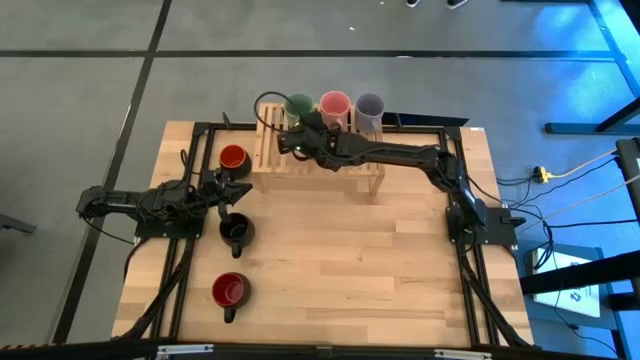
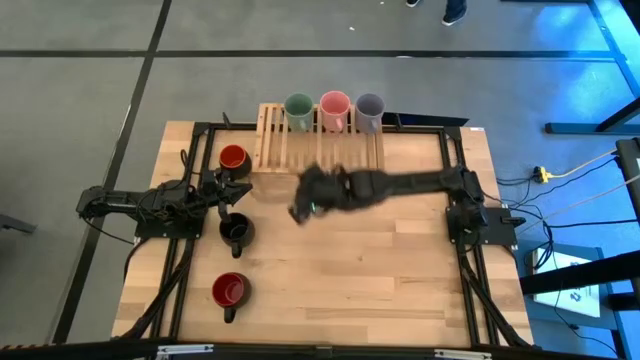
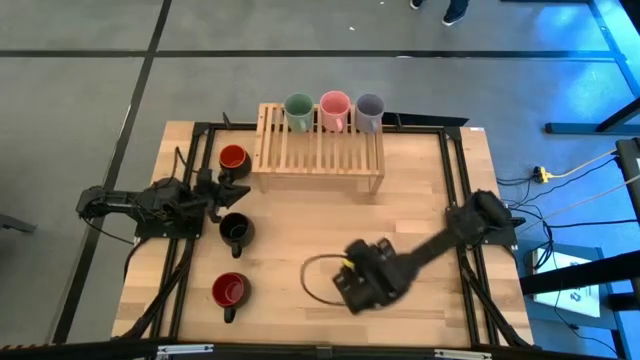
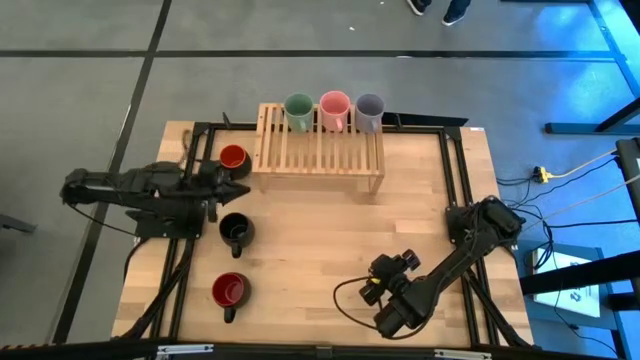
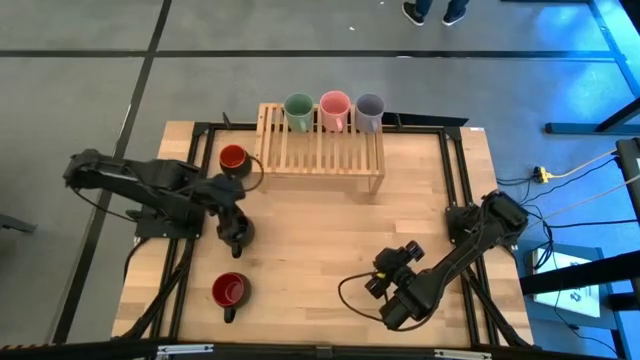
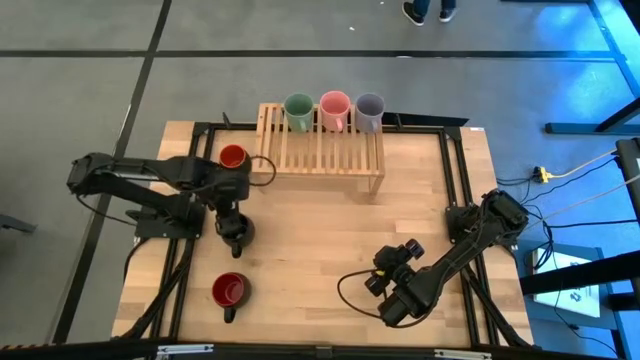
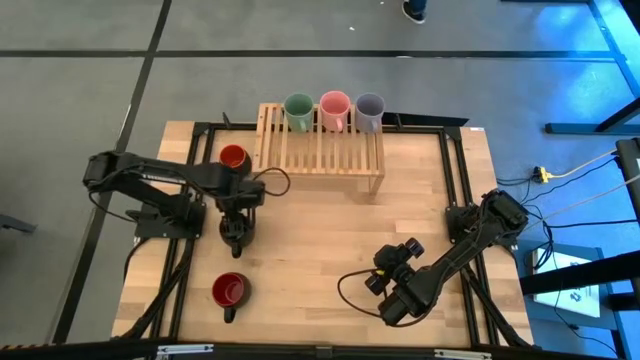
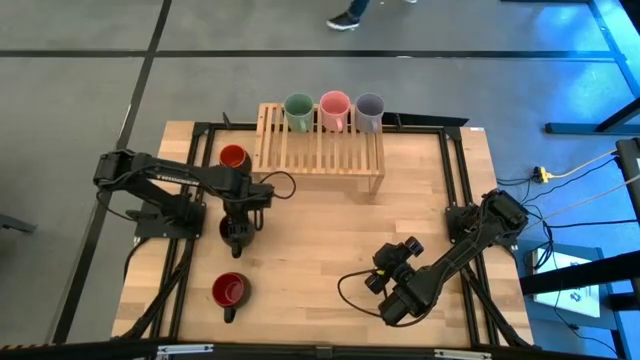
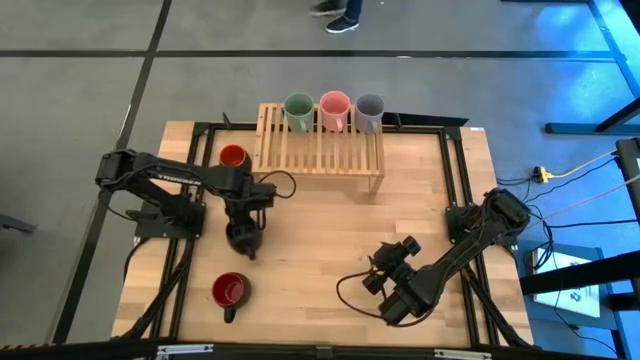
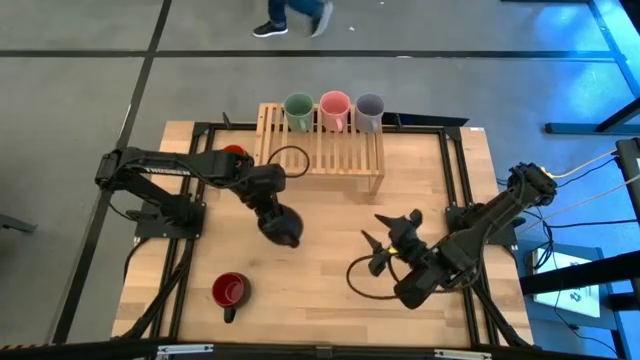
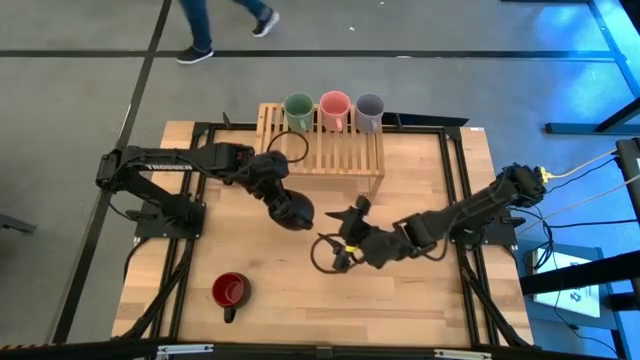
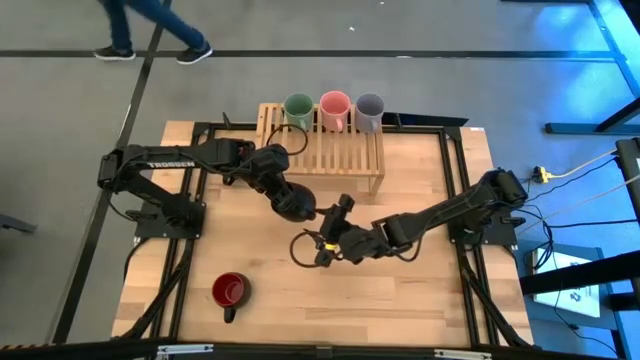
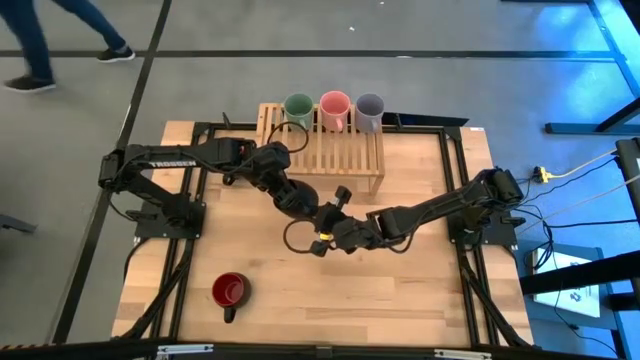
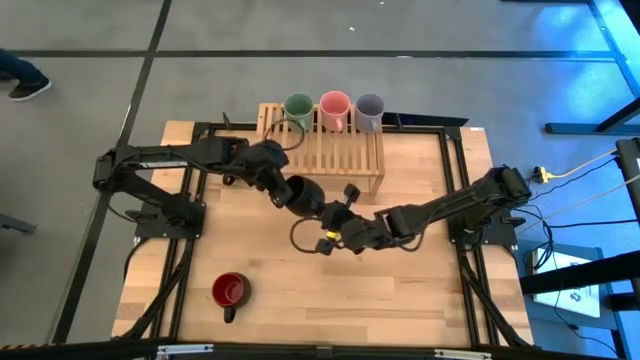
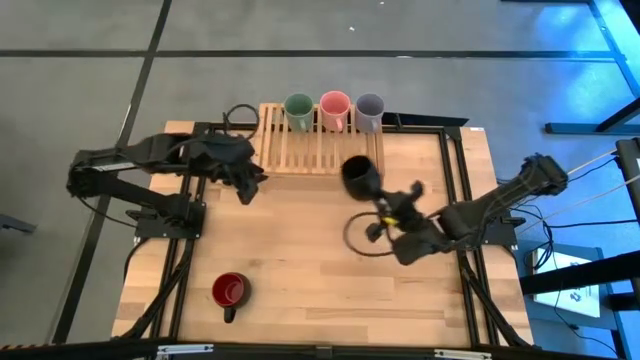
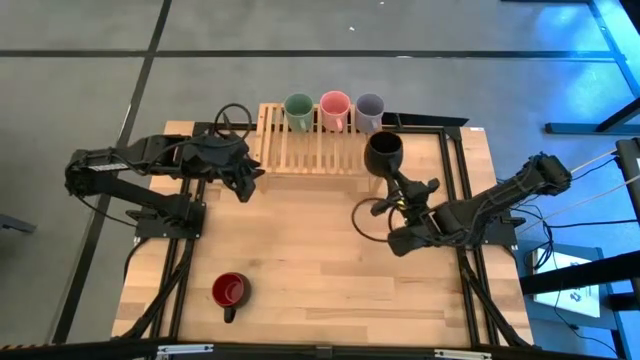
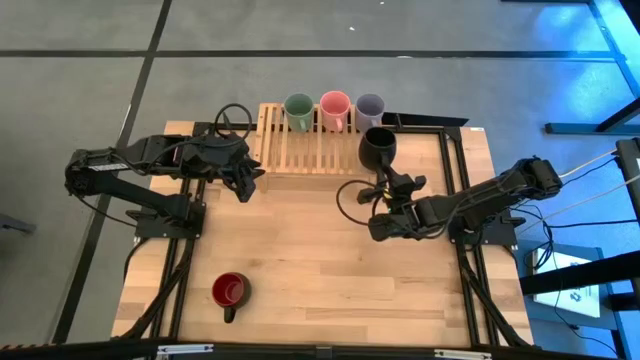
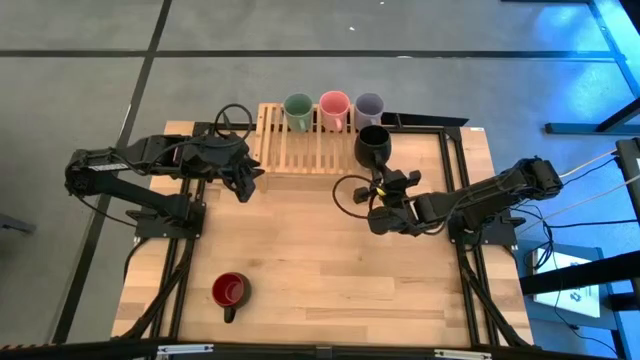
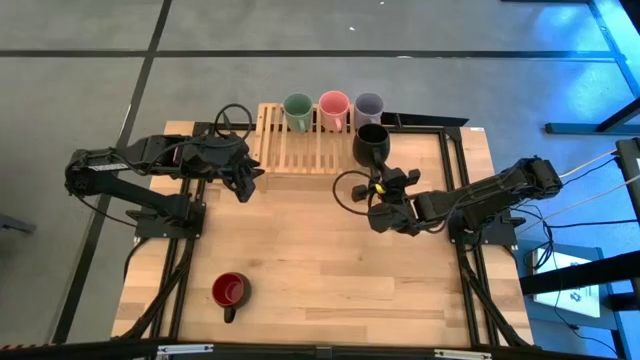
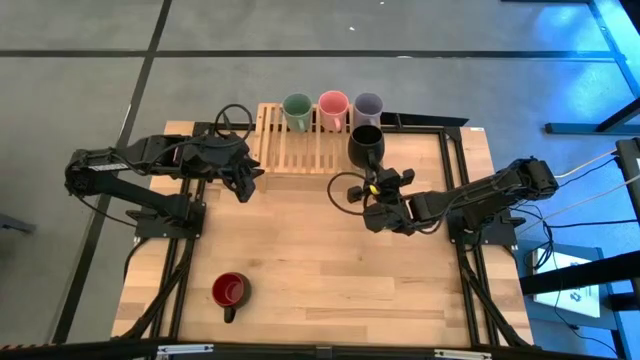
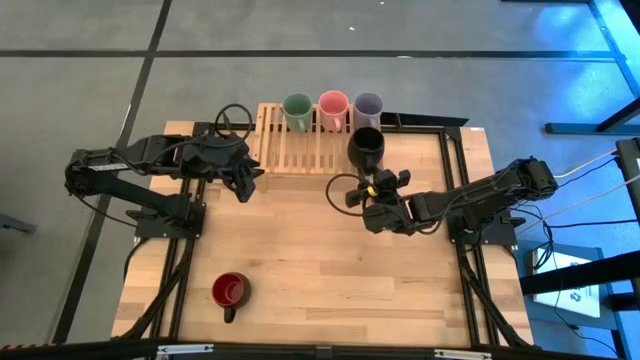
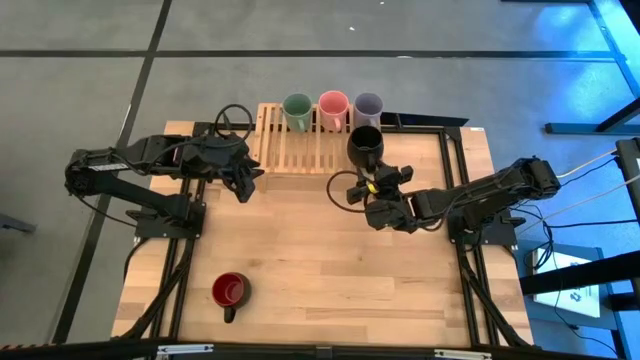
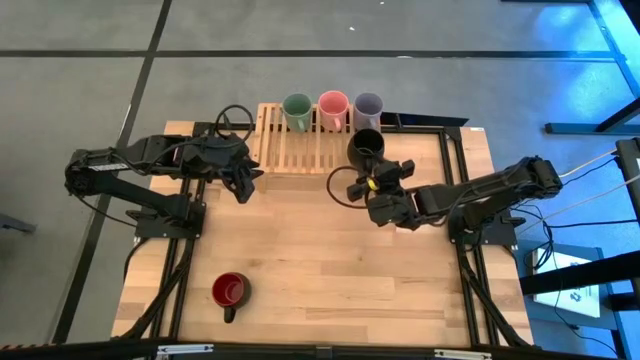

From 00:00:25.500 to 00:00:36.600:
Task: Place coffee mugs
Put the black mug on the shelf

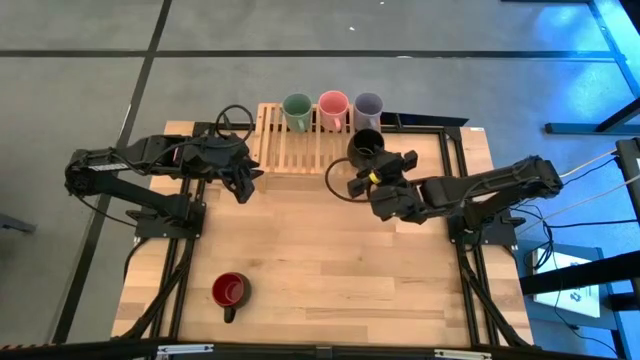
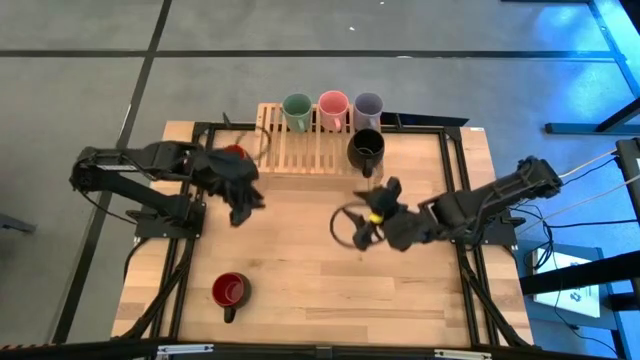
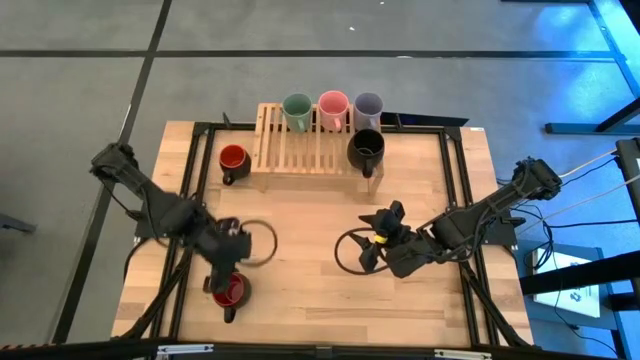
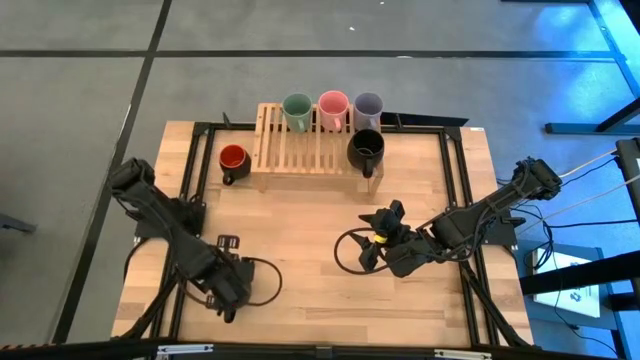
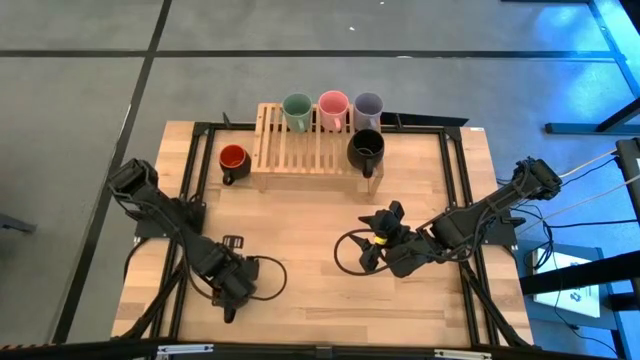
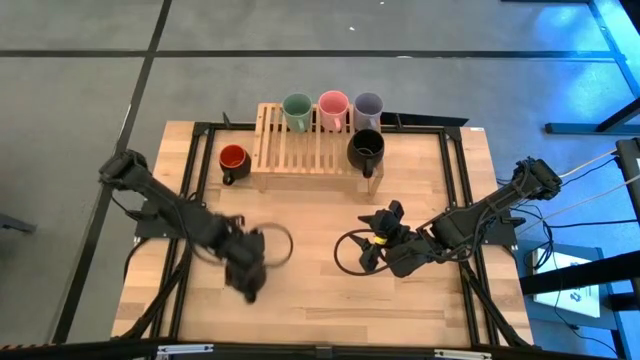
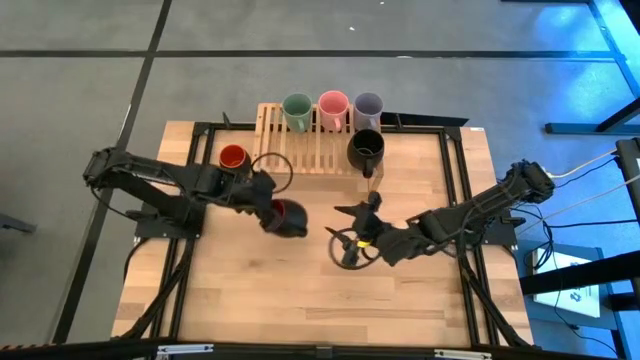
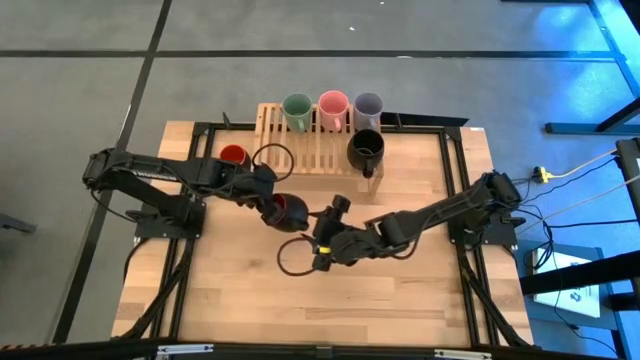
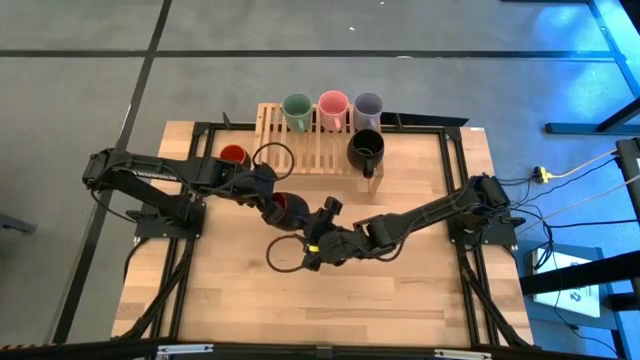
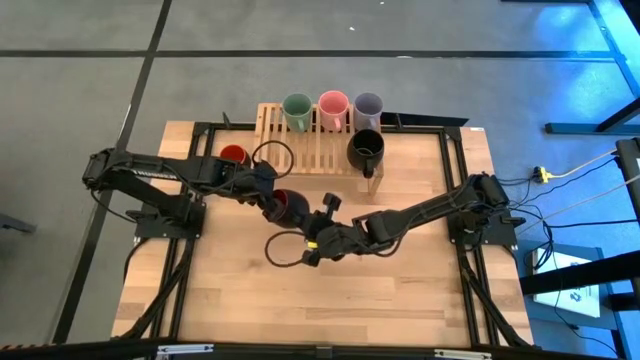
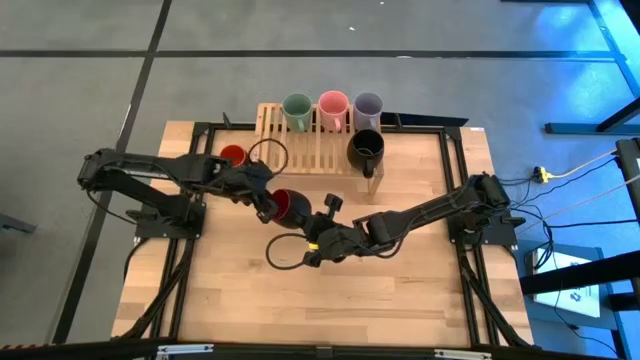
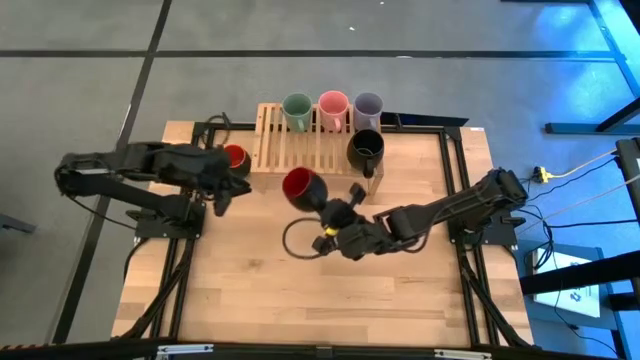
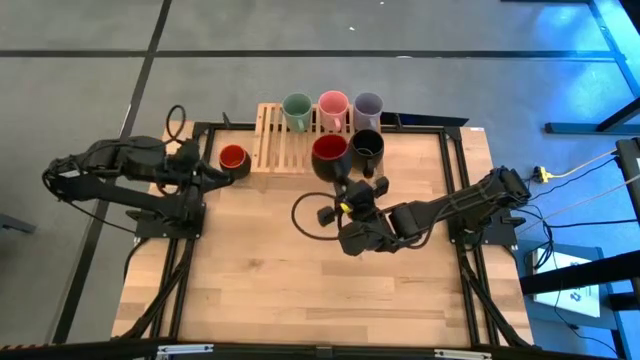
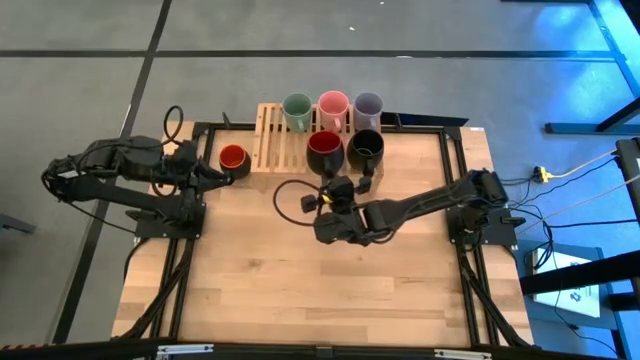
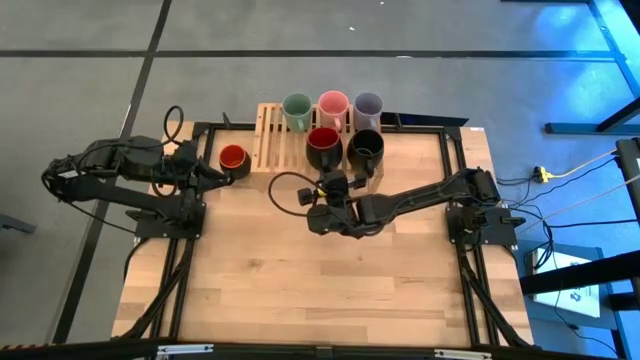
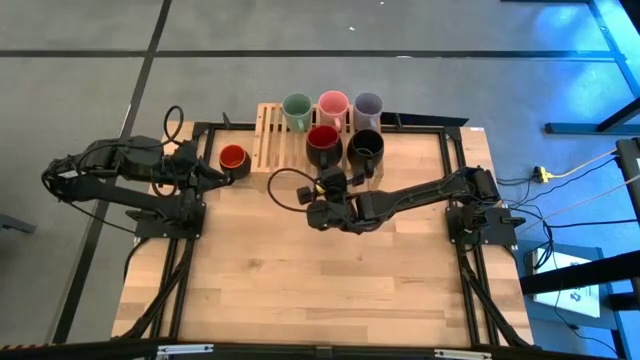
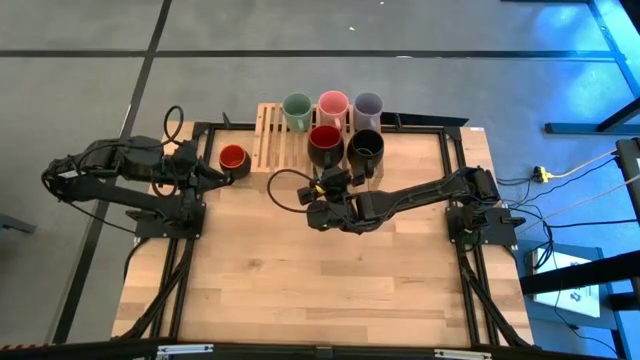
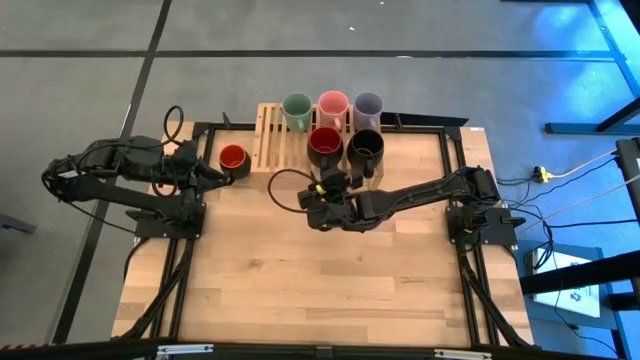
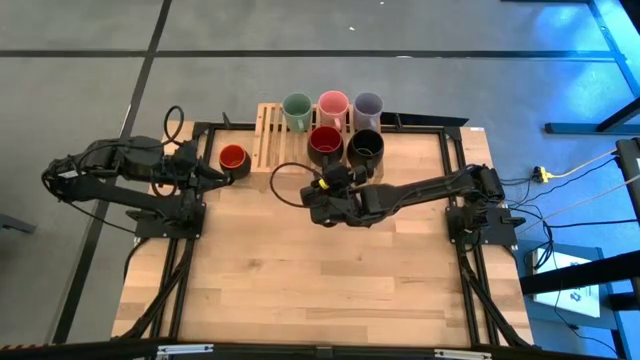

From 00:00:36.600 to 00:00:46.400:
Put the black red mug on the shelf
